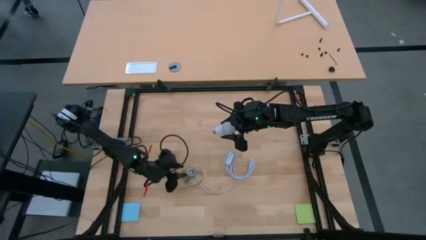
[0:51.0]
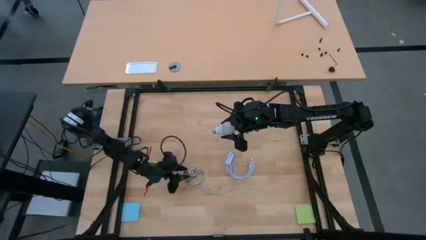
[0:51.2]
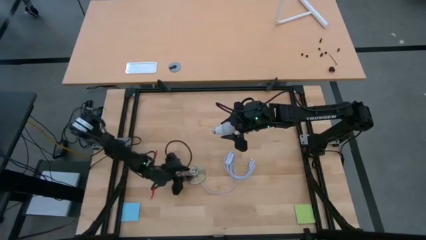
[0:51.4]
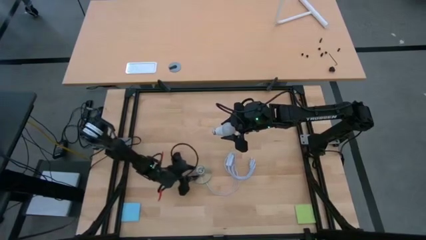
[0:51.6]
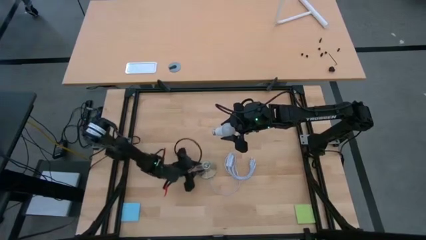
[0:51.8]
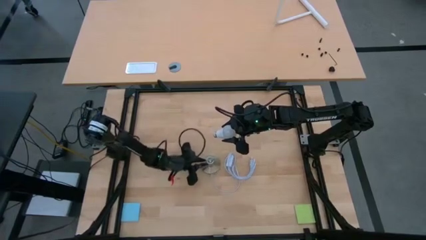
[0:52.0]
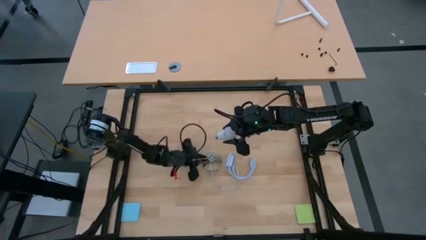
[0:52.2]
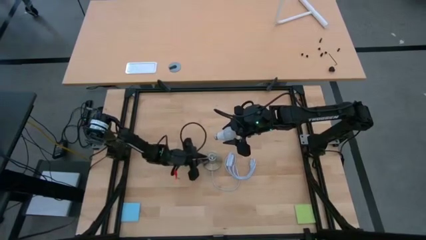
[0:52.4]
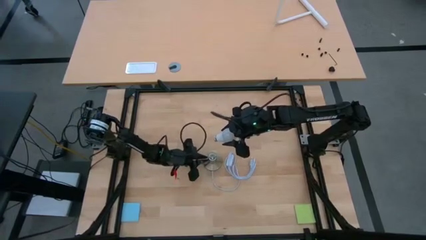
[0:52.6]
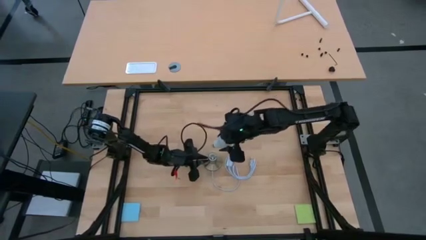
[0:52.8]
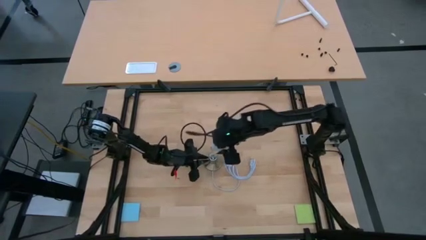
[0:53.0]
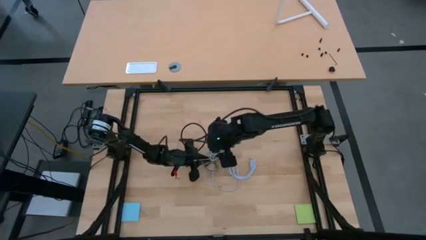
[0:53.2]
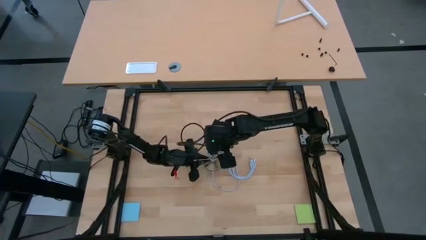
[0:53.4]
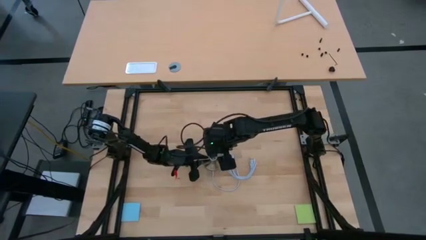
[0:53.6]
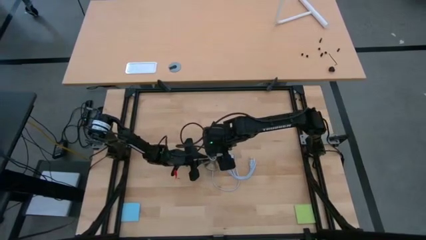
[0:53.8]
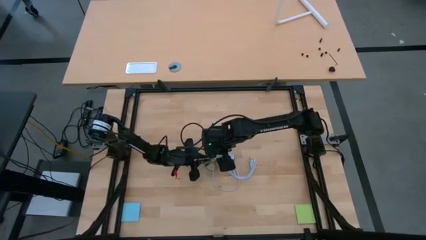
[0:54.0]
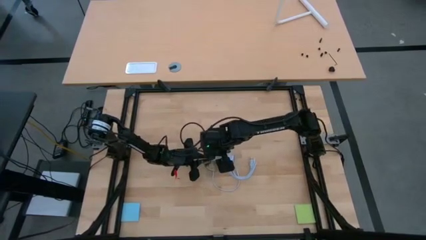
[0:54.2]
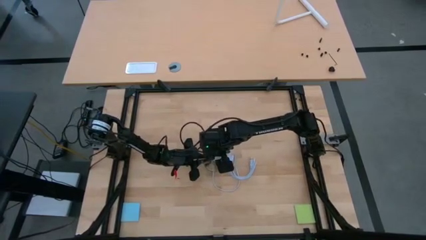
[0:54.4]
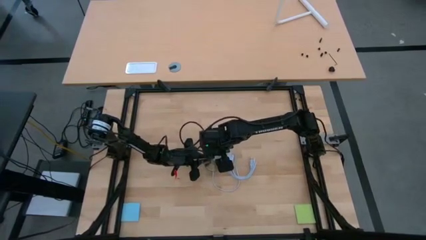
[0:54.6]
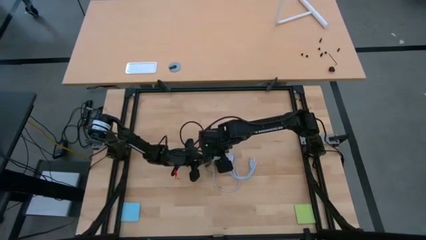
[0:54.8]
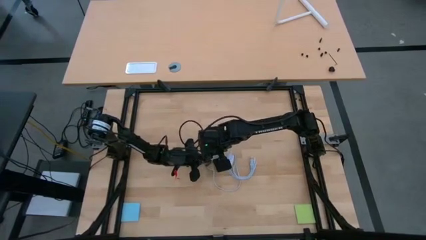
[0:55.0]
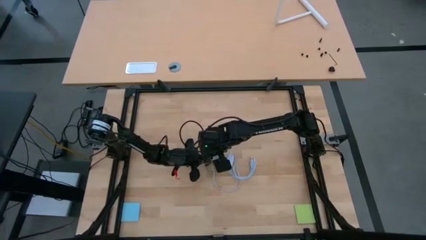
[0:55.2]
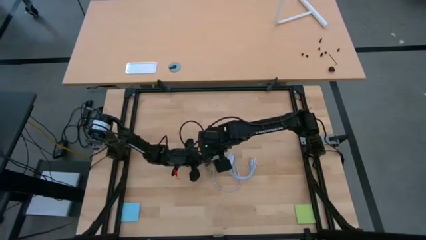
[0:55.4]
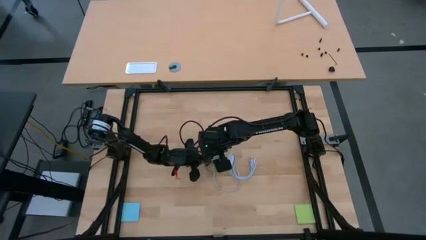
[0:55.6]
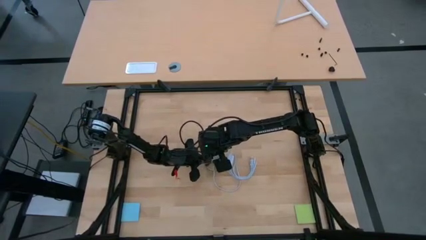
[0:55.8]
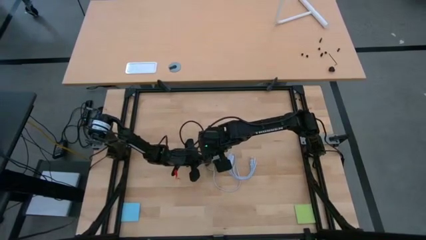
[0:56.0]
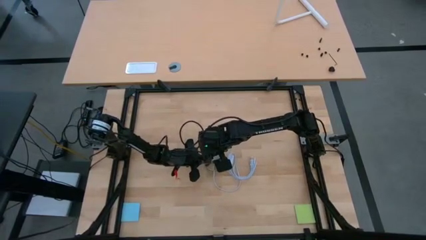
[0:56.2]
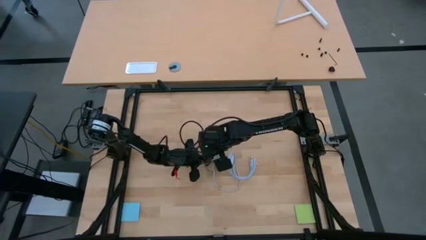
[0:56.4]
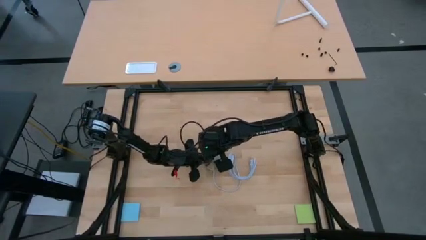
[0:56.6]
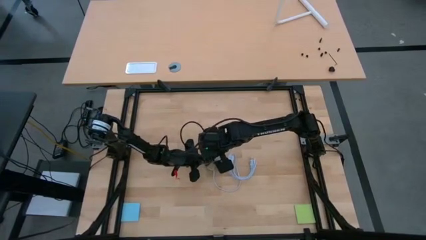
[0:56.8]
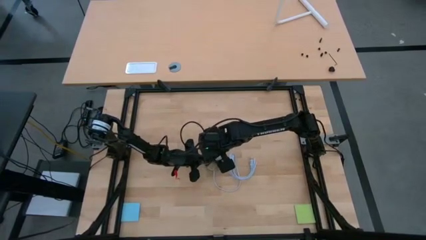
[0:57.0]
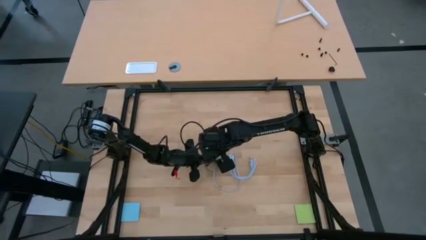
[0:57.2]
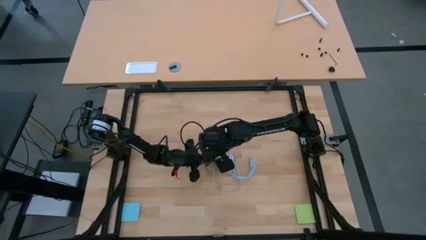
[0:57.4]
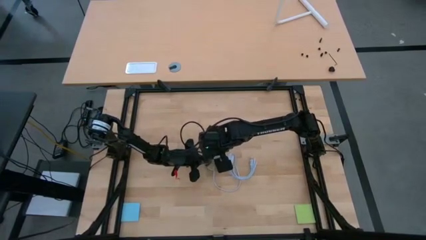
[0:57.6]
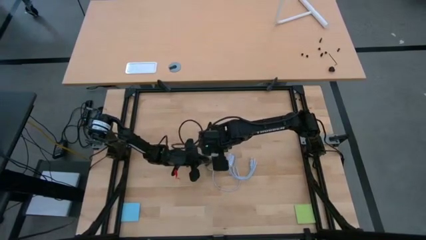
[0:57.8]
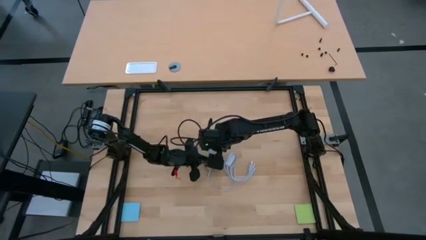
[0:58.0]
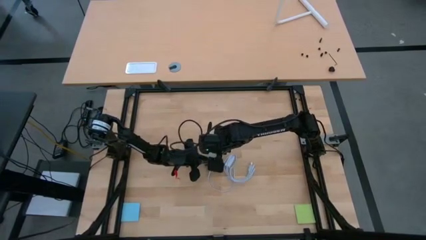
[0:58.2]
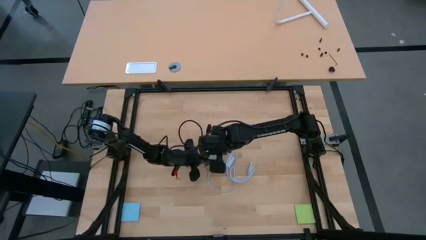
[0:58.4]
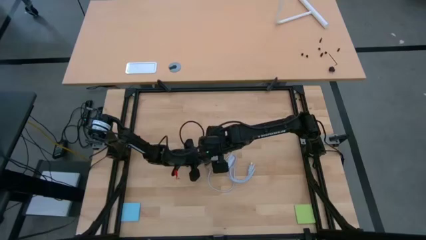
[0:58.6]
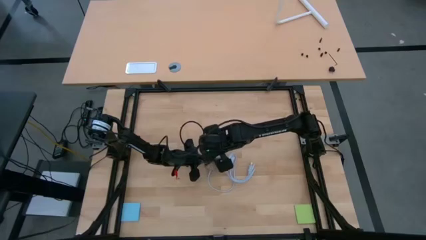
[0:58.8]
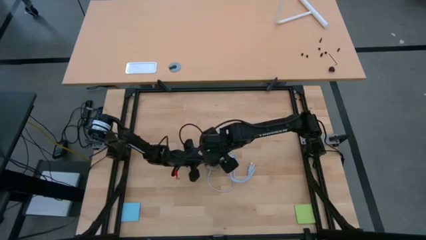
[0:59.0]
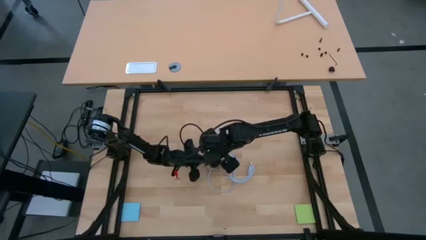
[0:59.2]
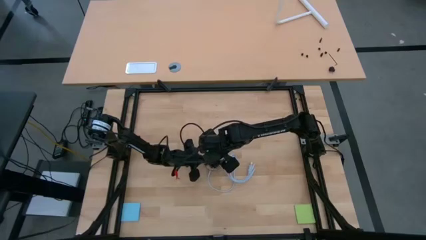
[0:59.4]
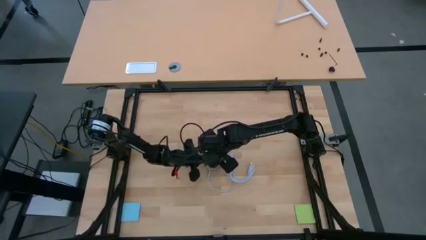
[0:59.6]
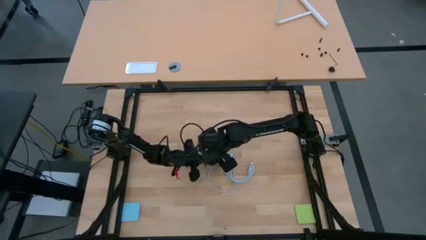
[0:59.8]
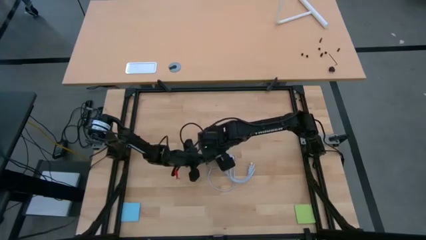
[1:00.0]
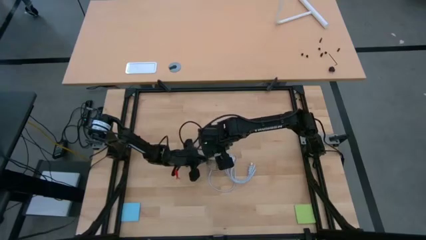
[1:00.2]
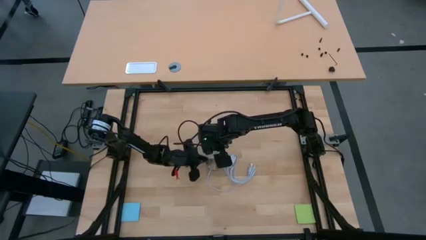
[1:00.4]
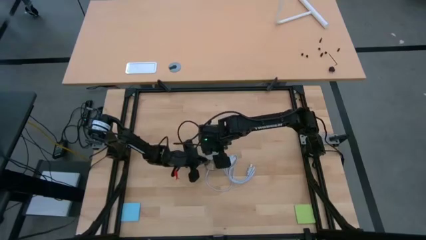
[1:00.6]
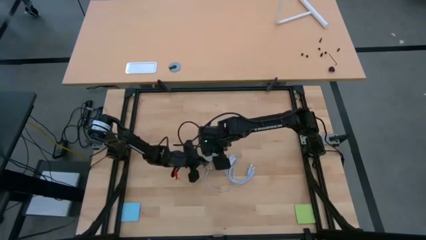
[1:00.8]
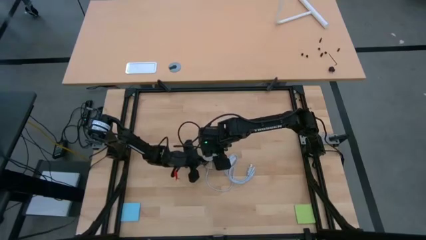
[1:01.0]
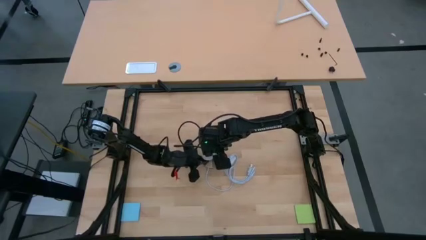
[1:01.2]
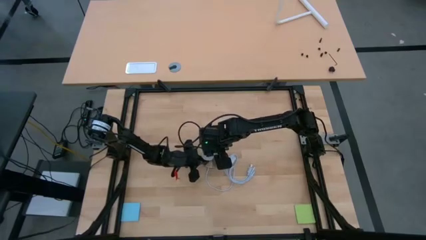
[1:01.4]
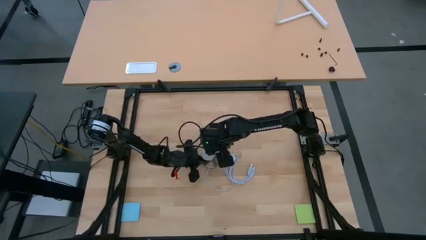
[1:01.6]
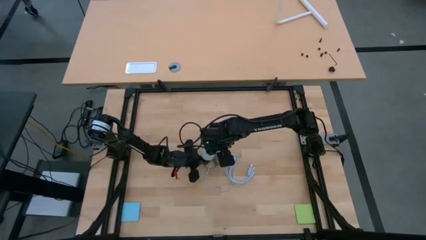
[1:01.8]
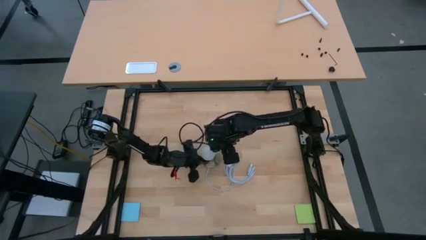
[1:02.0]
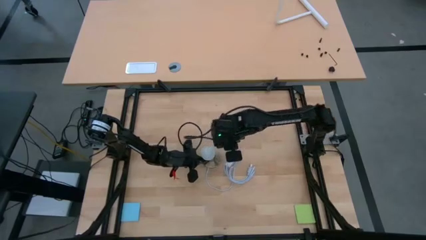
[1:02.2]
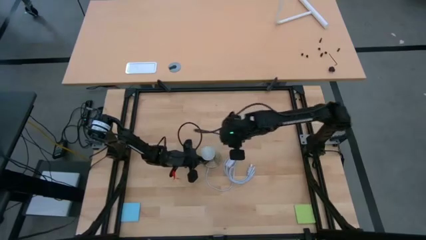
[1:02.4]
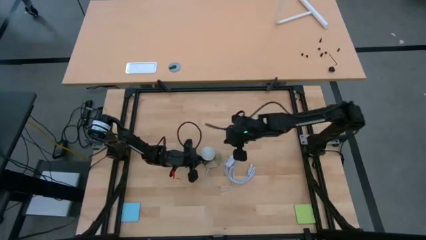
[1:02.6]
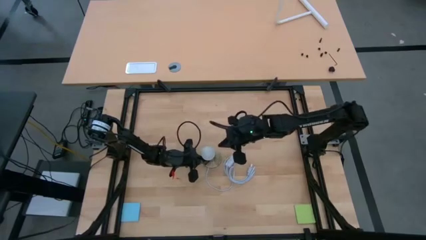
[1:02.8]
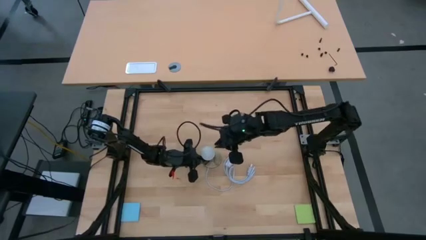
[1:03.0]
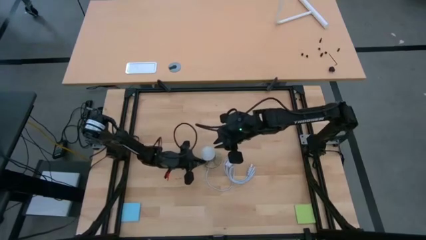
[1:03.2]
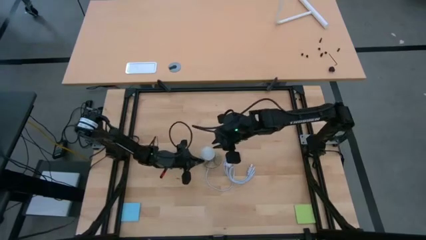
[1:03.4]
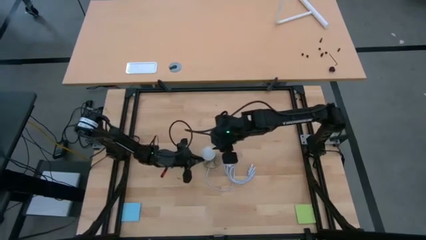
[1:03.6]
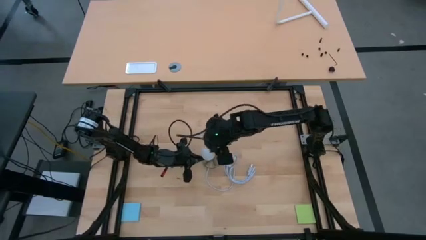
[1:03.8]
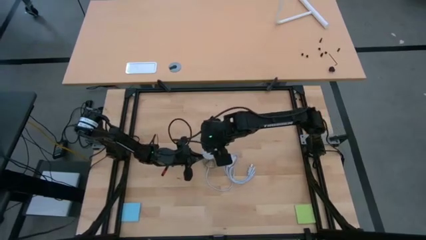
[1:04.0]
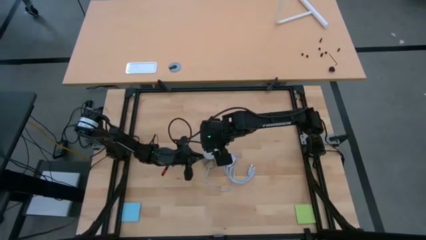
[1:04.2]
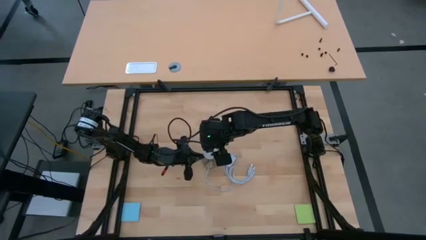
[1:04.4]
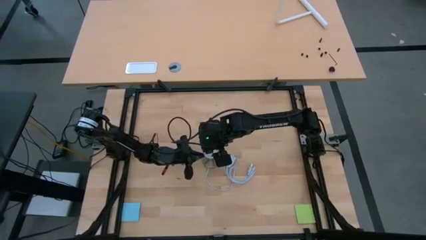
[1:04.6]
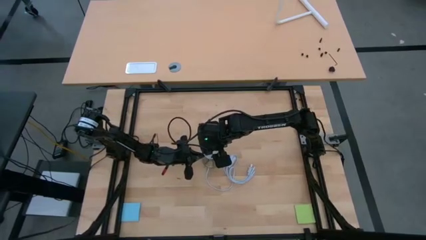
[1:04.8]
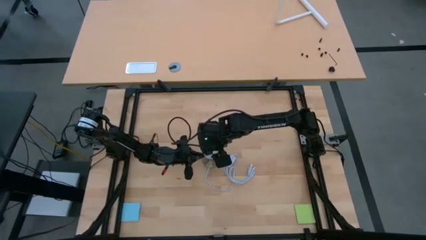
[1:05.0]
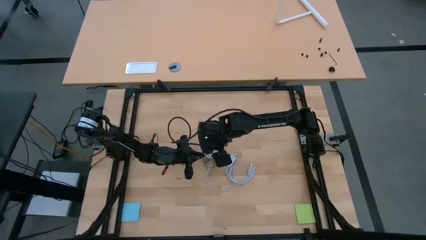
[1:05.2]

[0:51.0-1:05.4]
Task: Screw lightbulb
Insert the white lightbulb into the golden lamp

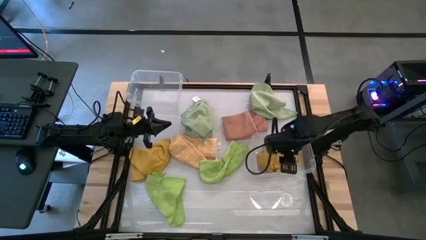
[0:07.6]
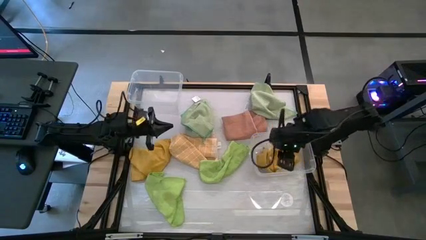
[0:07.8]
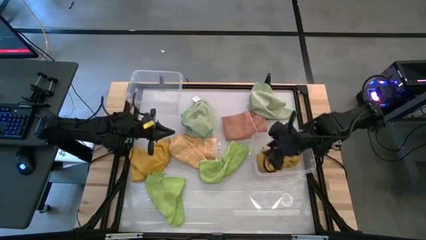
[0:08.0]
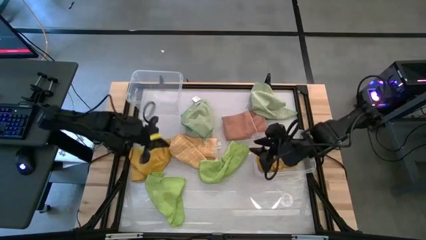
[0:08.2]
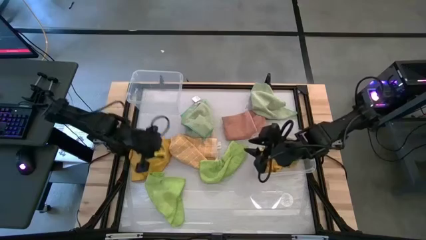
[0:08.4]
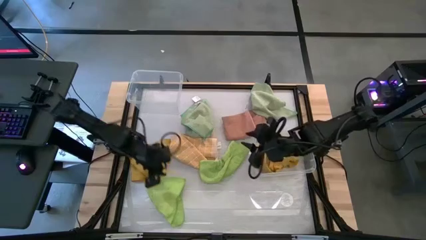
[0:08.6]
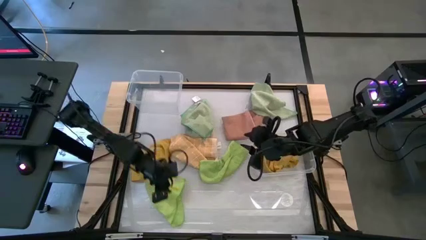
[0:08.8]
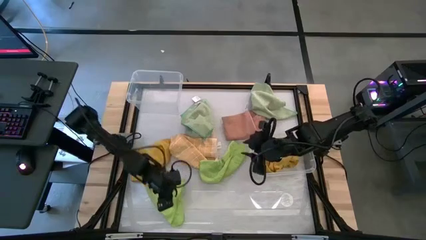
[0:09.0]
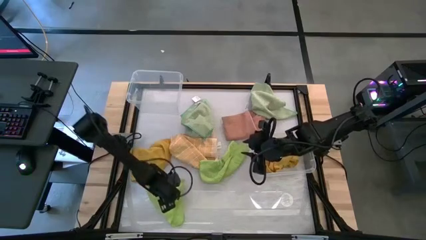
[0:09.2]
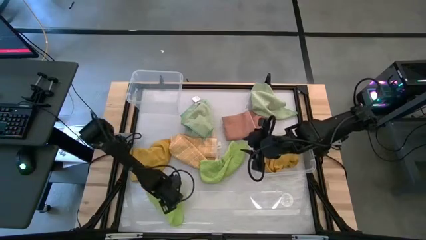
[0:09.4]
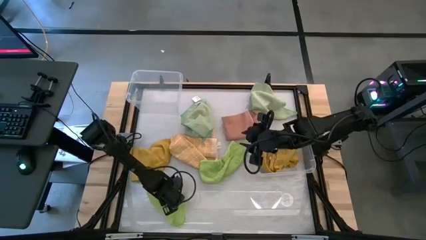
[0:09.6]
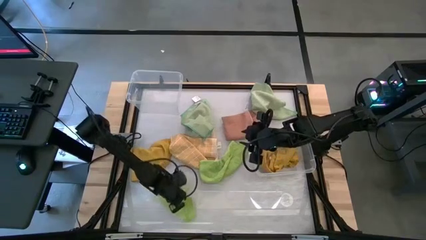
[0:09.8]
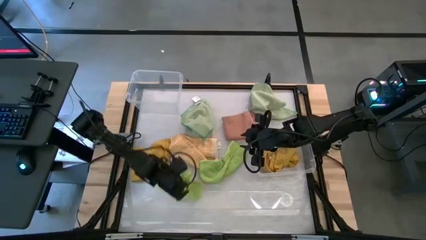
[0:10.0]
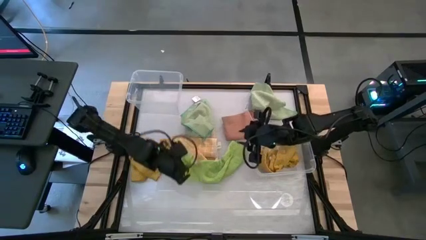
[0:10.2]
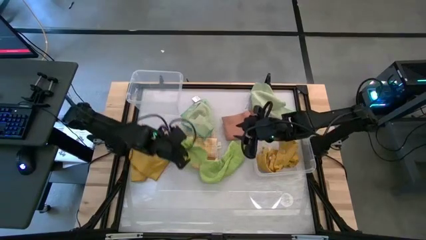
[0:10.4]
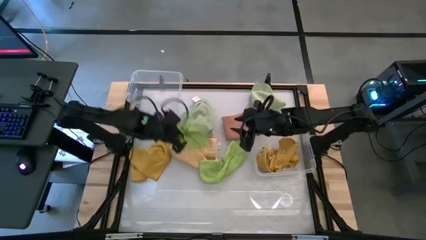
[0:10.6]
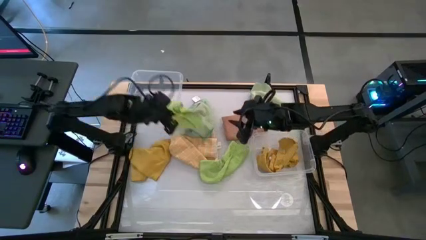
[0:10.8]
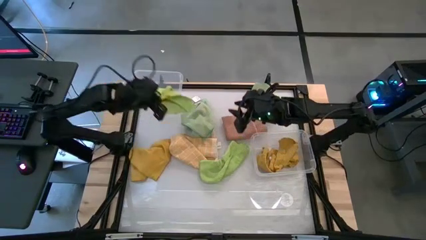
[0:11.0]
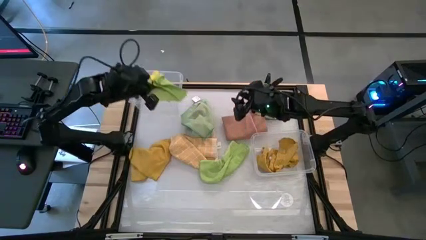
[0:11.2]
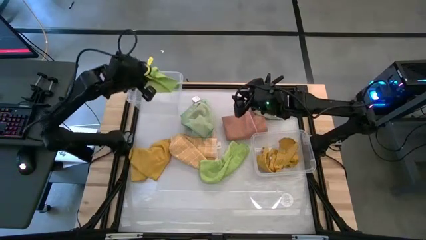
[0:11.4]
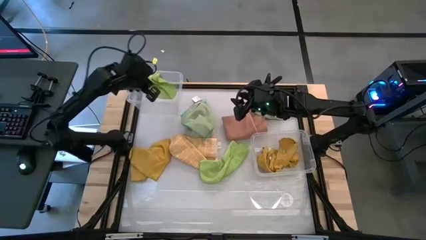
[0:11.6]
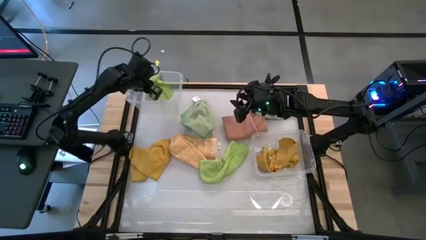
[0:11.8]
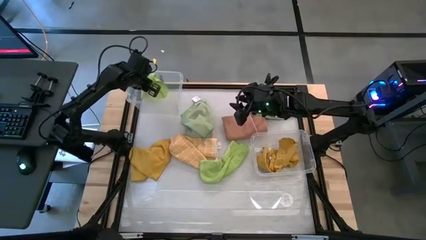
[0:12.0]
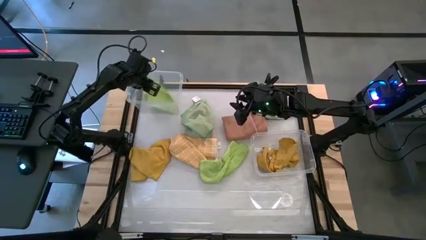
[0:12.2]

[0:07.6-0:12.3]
Task: Sort towels by color in basket
Put the bottom green towel into the left transparent bin
